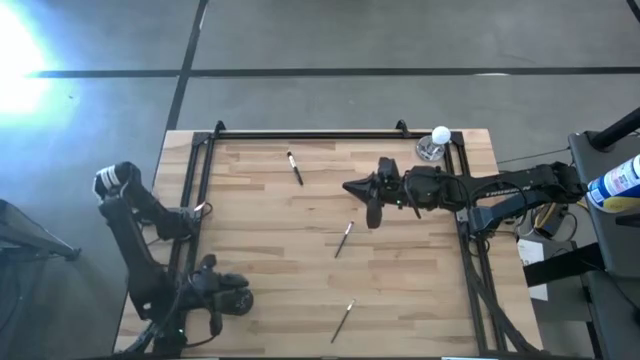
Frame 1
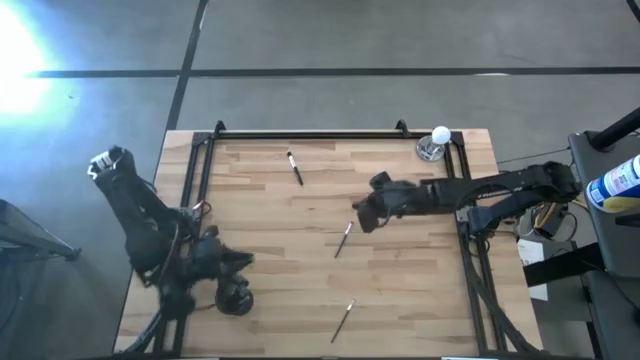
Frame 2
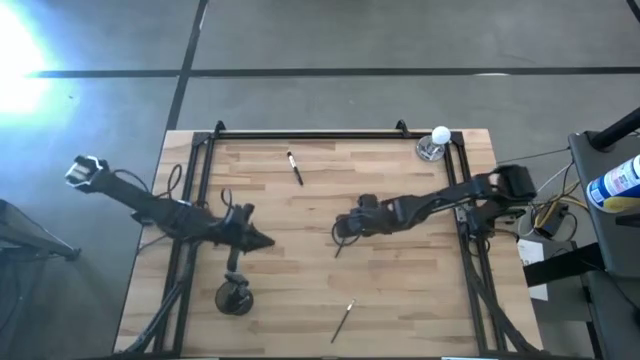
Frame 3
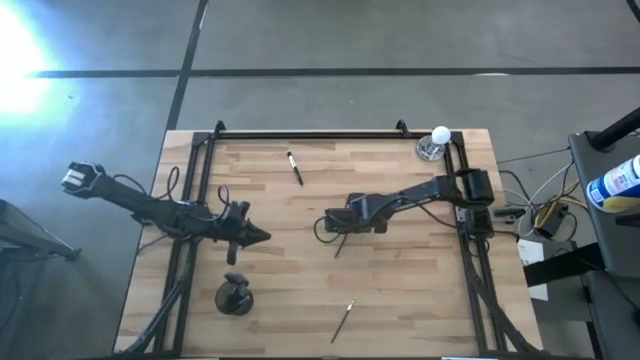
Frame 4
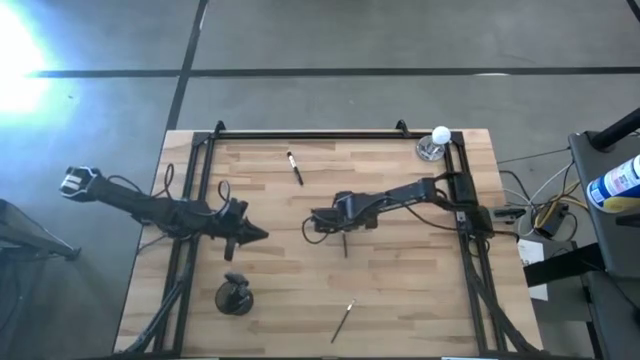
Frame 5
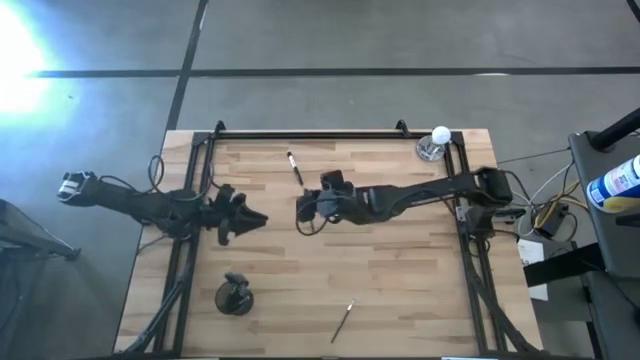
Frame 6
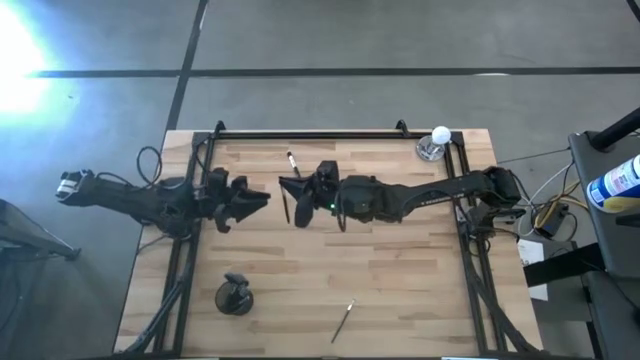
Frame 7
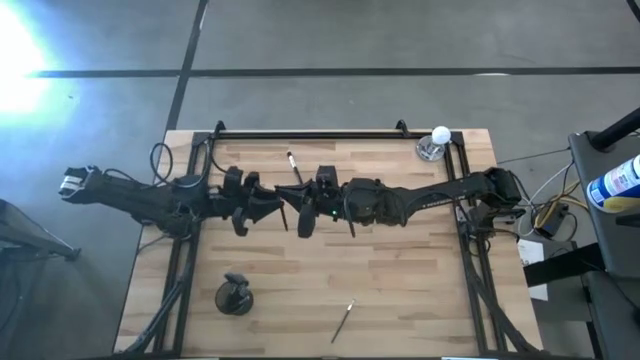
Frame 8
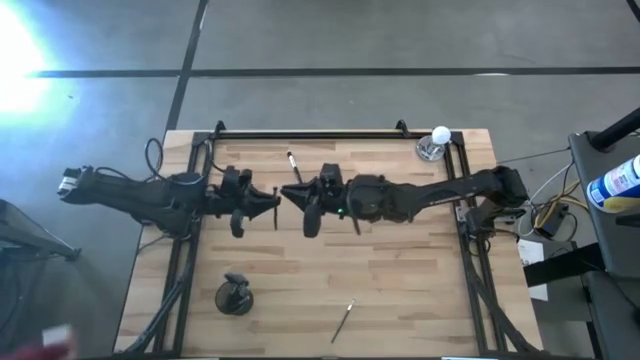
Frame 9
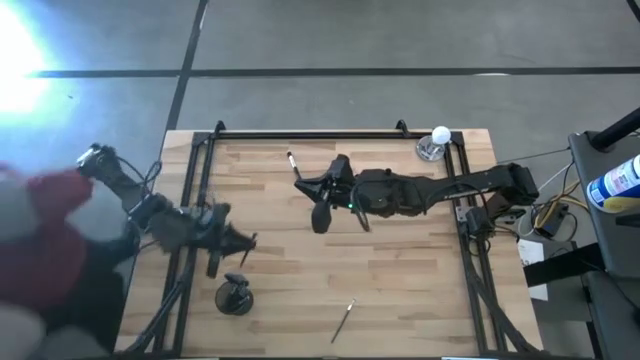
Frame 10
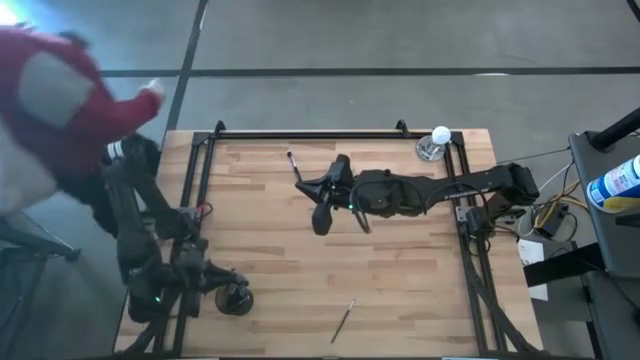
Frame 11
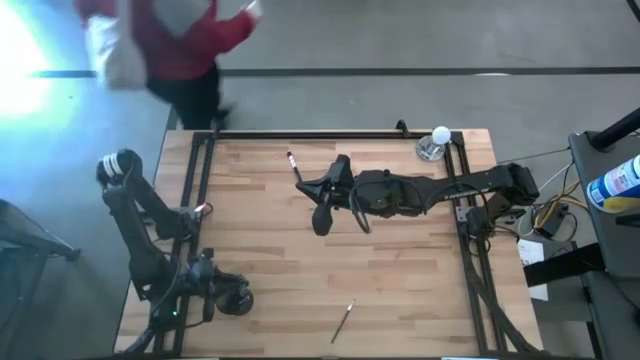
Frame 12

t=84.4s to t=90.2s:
Task: Pick & Place Makeup Brushes
Put the foundation brush into the holder

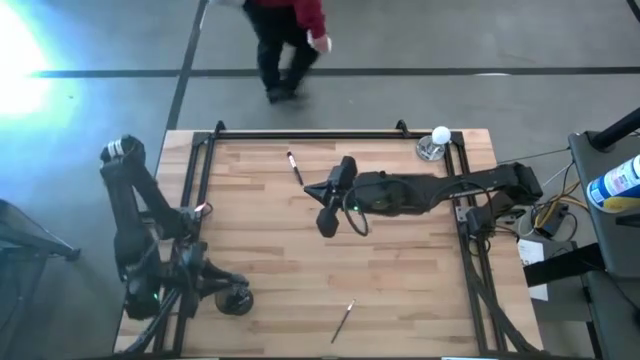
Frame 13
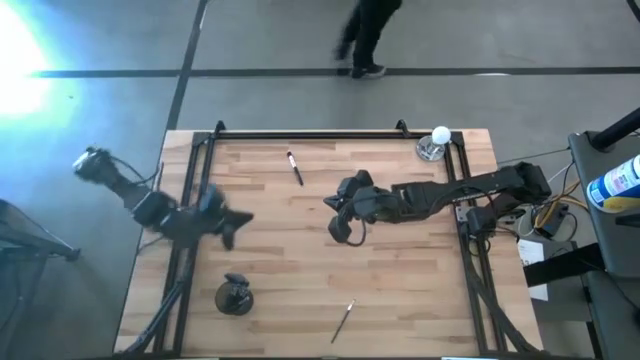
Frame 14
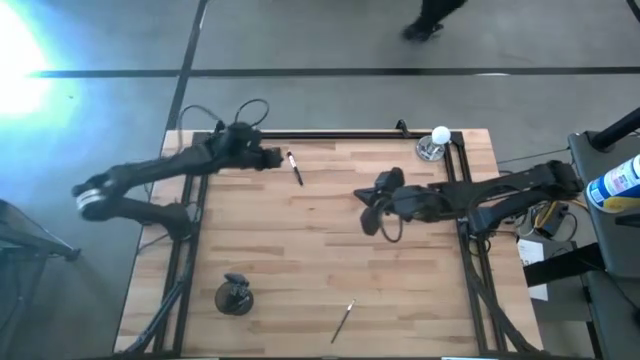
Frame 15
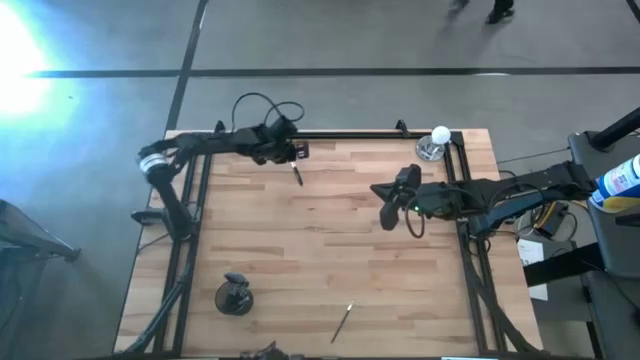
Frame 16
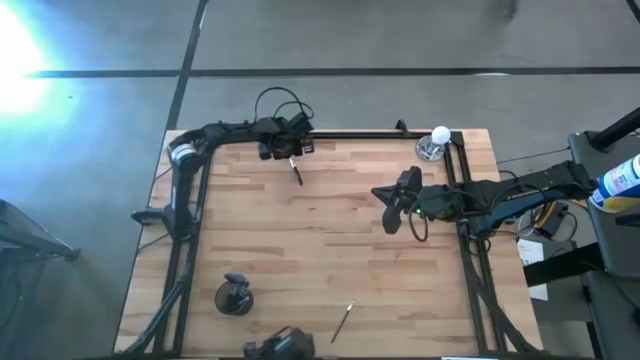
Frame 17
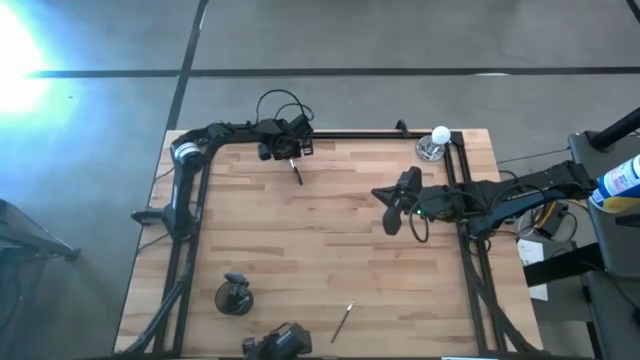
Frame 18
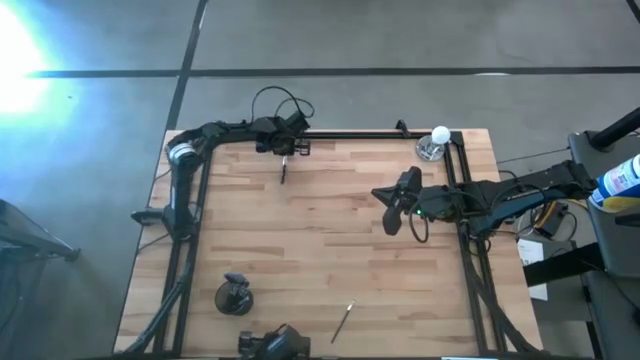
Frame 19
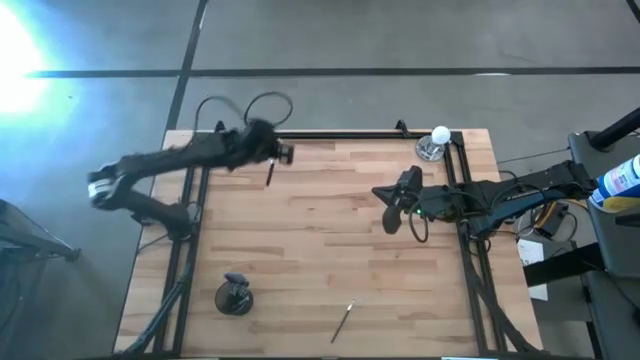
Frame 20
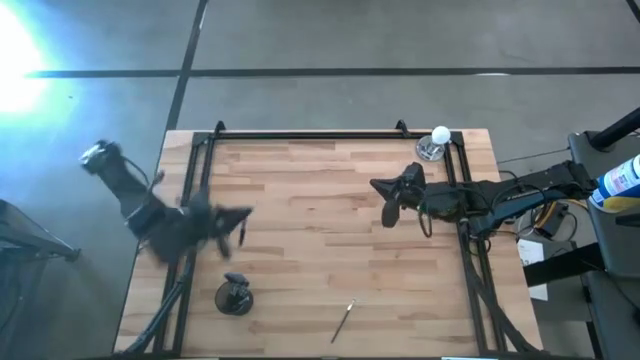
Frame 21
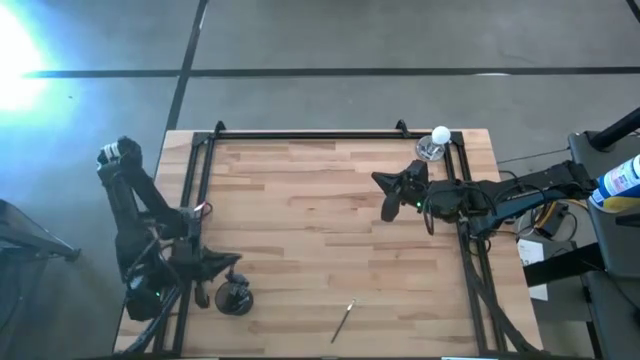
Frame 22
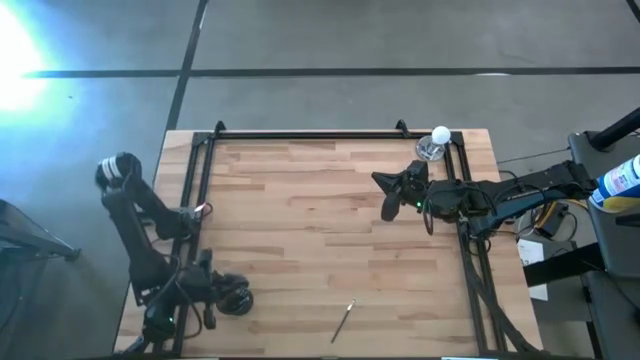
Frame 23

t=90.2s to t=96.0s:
Put the blush brush into the holder

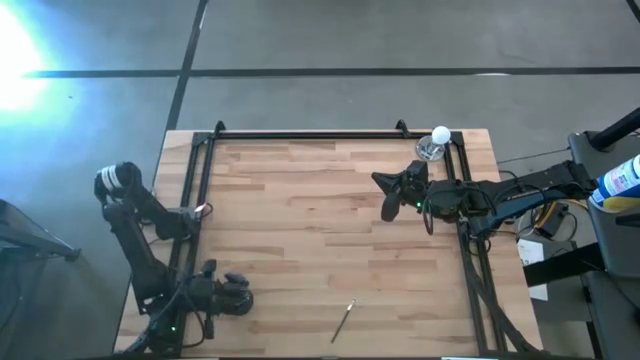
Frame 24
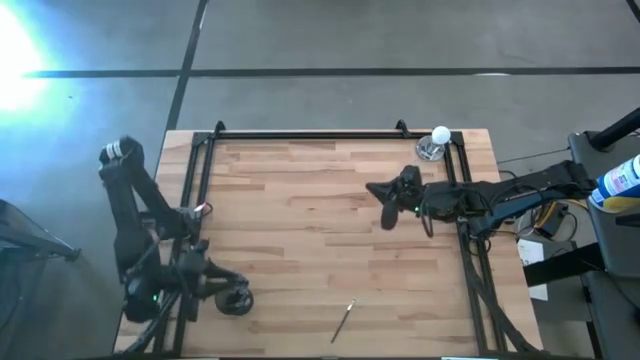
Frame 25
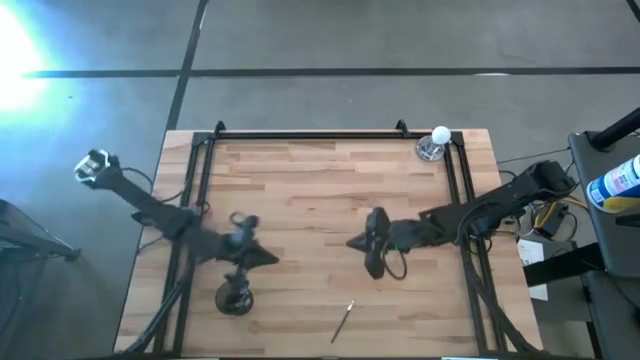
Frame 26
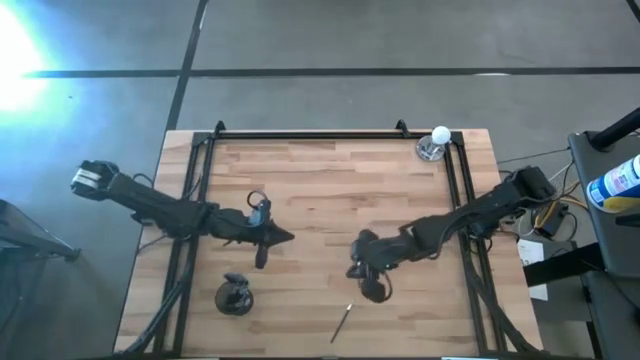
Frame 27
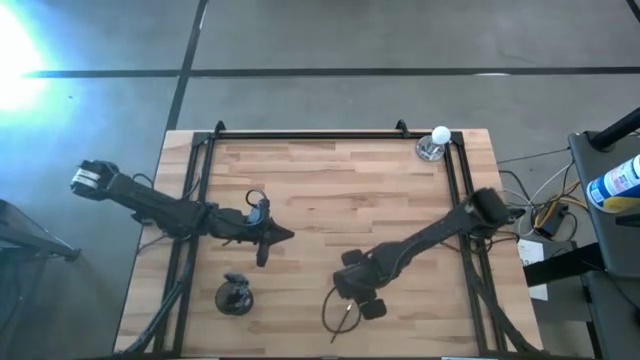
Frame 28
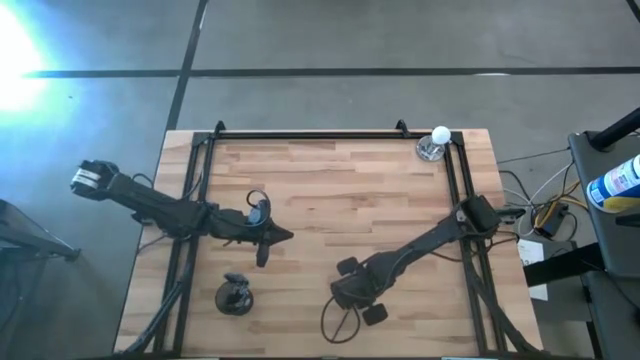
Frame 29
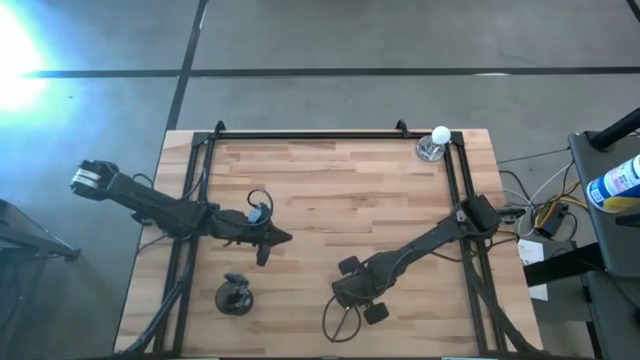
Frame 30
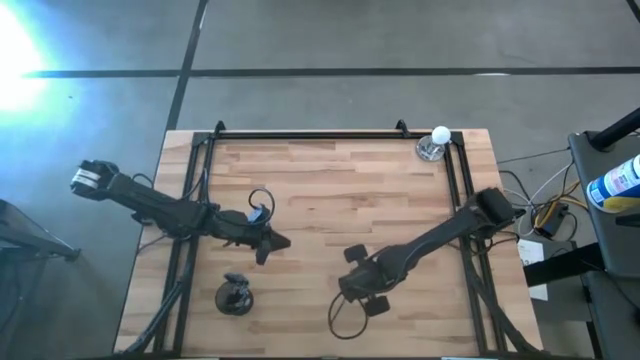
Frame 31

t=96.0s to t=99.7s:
Put the eyeshadow brush into the holder

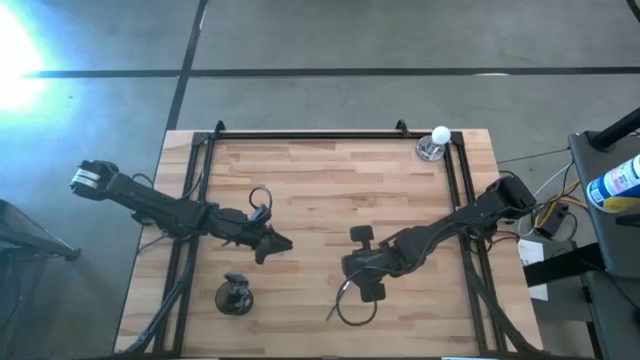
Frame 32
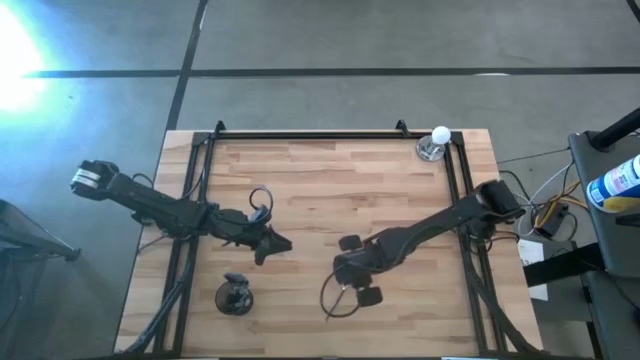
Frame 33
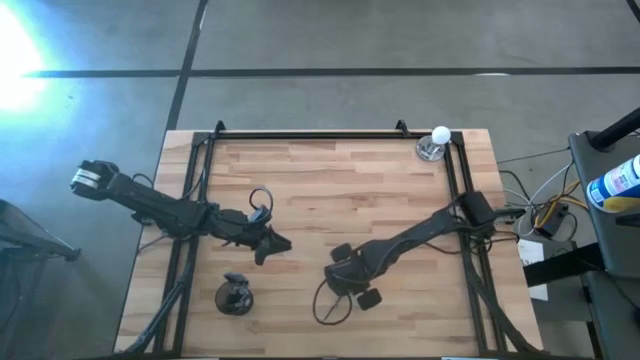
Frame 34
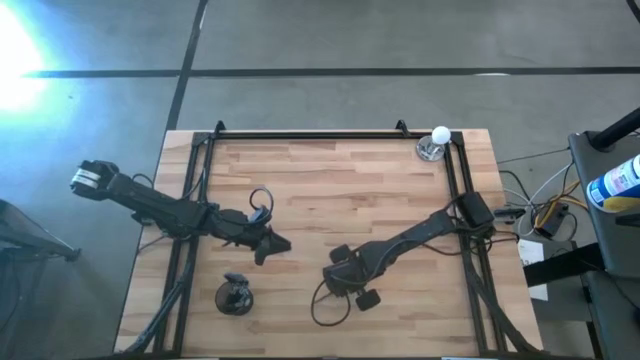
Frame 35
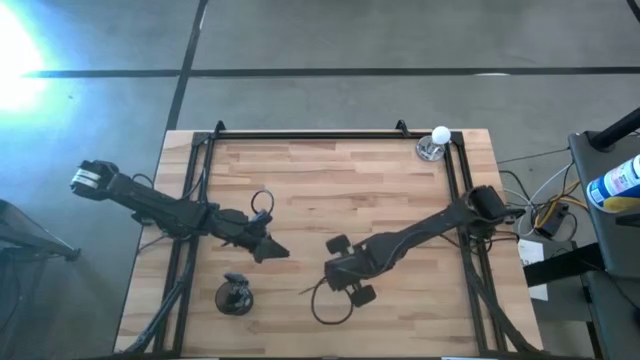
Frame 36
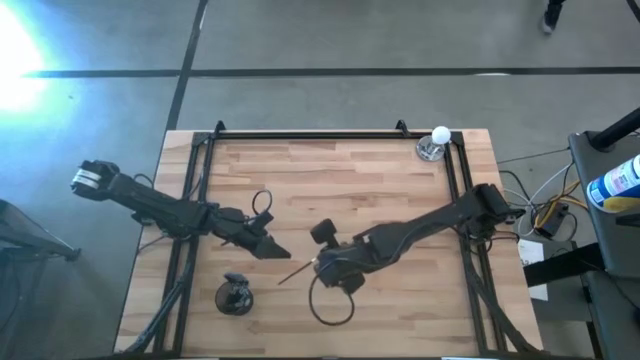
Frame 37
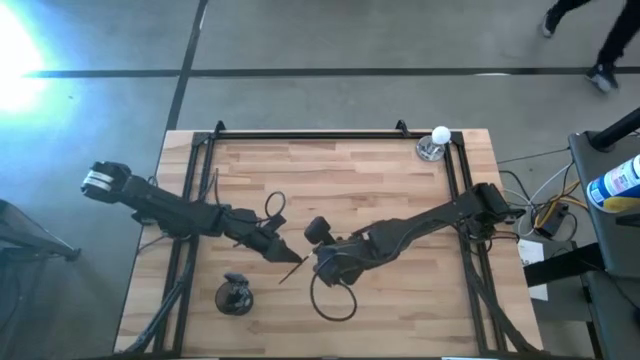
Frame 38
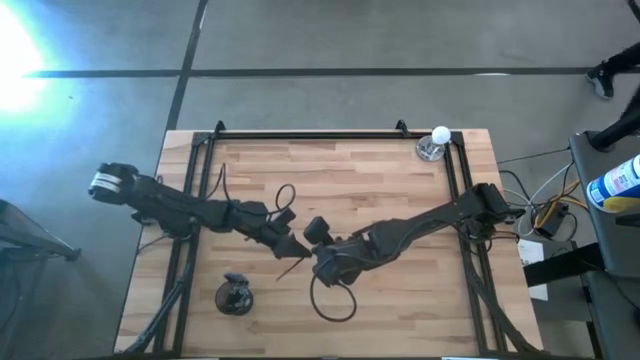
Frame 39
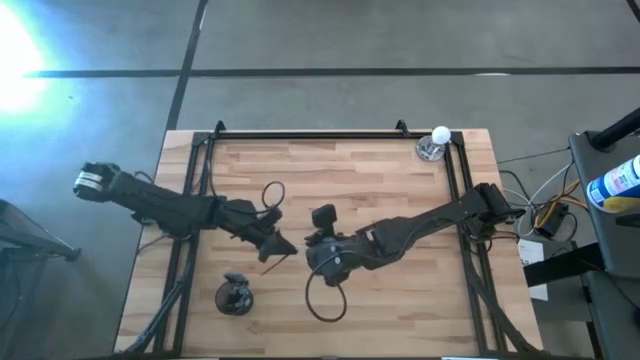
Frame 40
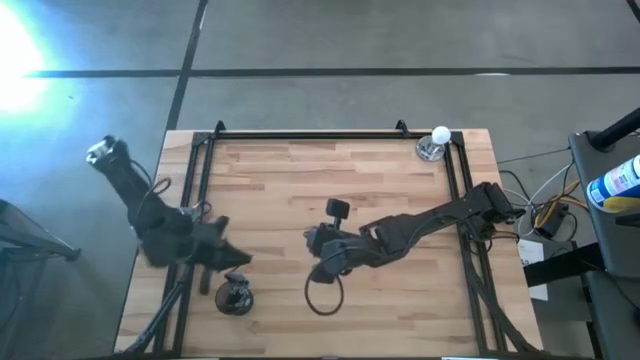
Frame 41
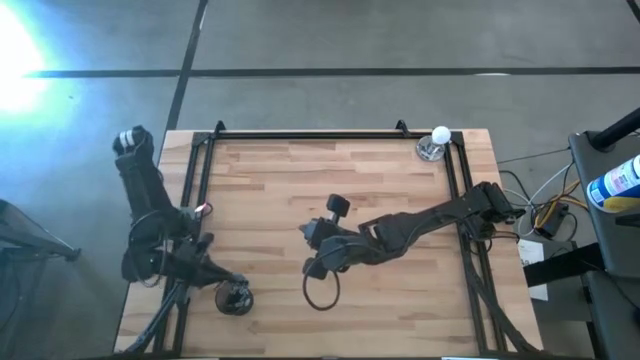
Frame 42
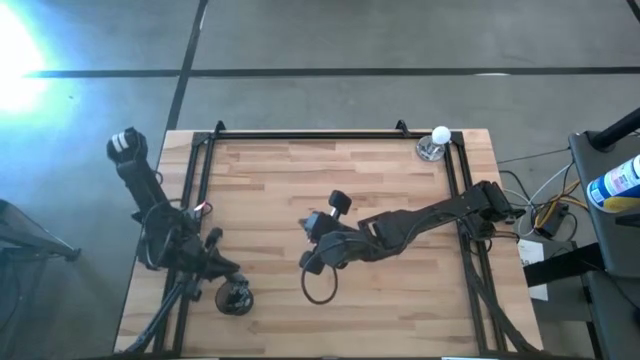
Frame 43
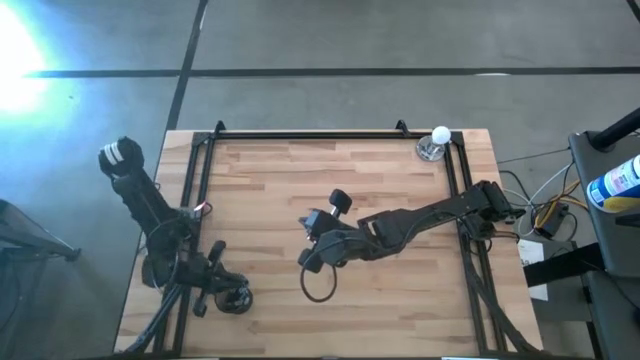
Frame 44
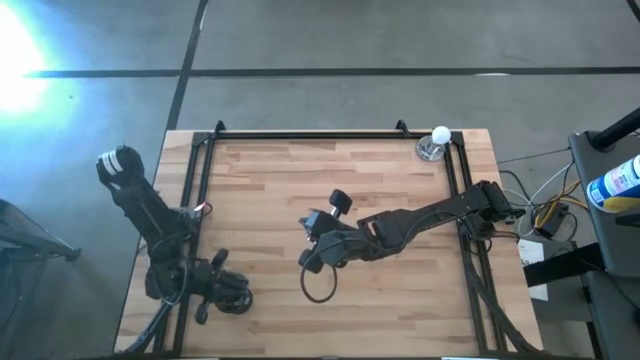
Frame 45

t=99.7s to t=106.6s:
Put the eyeshadow brush into the holder
